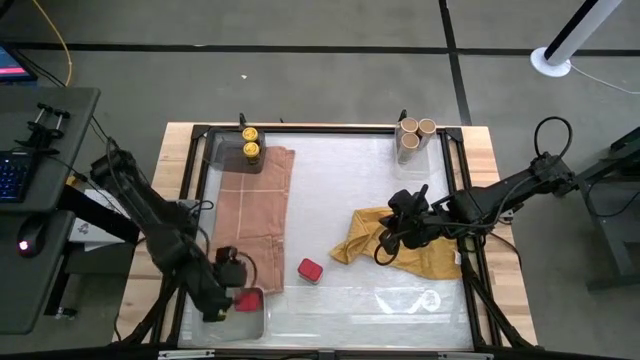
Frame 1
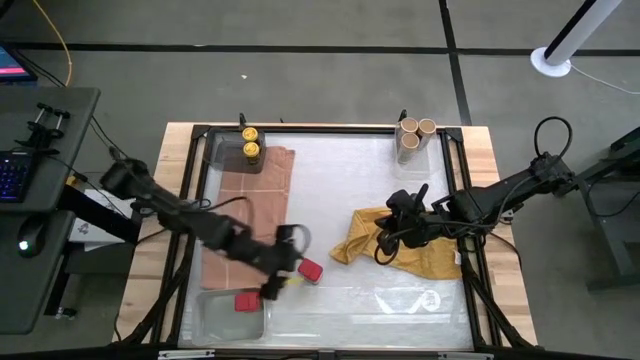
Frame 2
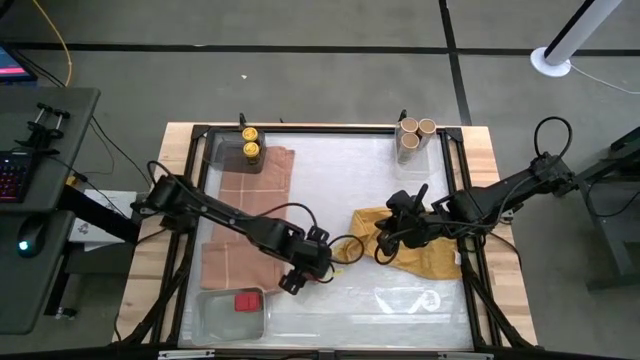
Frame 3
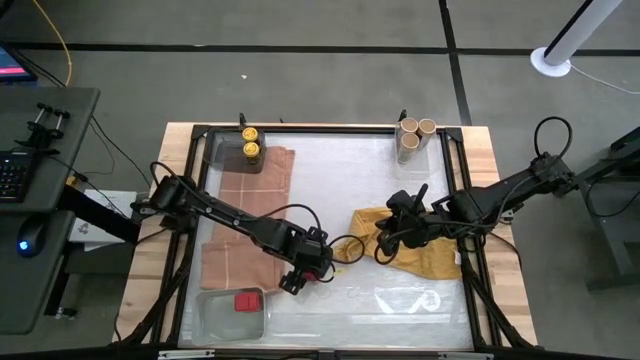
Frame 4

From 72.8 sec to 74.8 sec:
Task: Sort spices by type
Put the red seasoning can into the gray bin

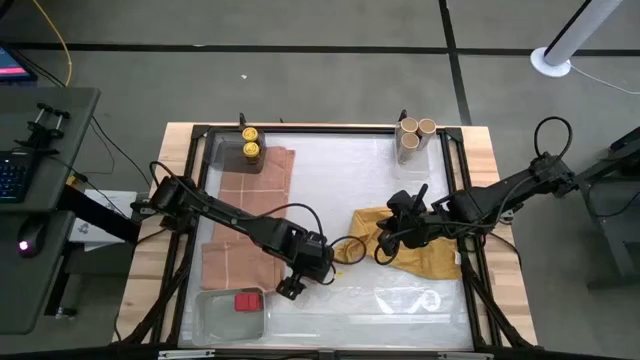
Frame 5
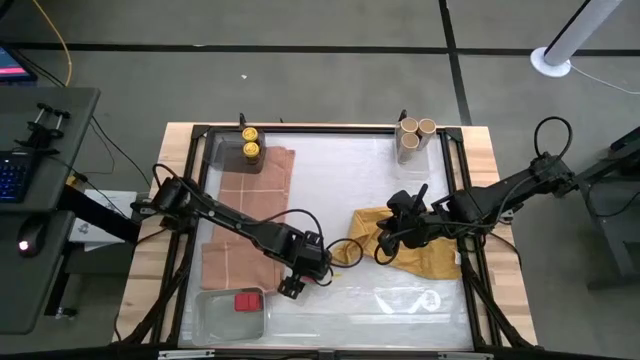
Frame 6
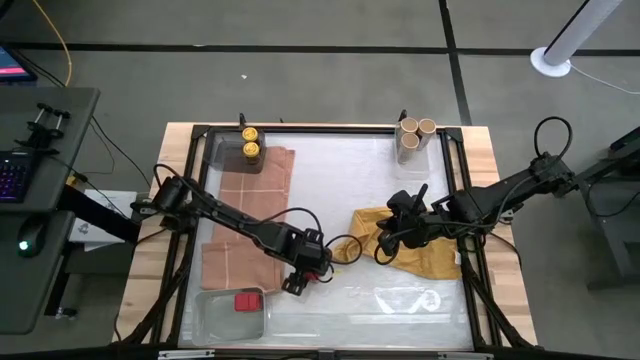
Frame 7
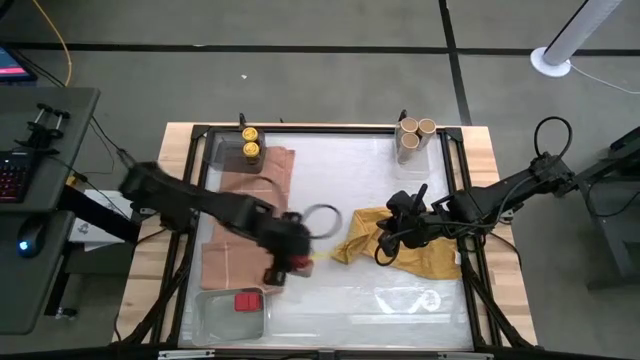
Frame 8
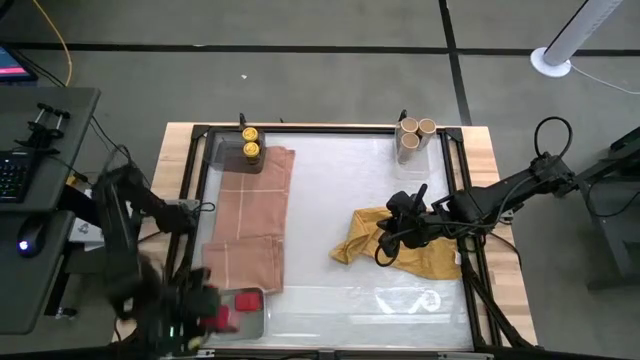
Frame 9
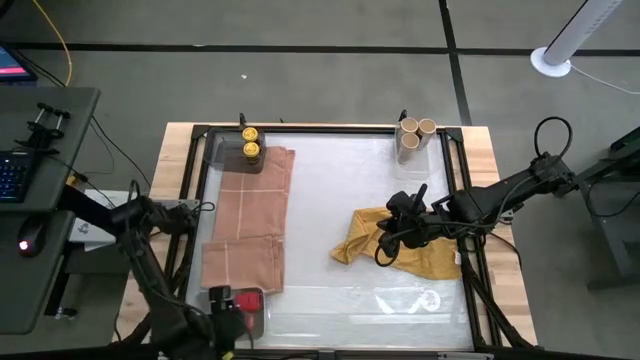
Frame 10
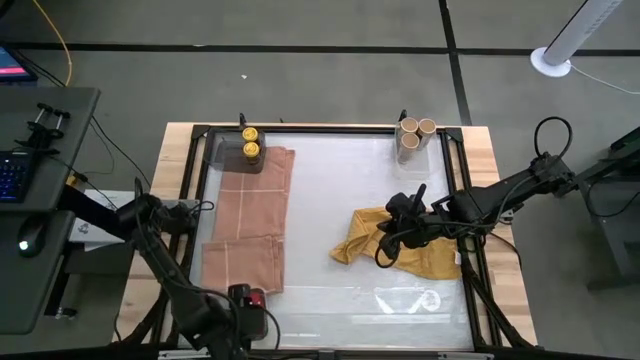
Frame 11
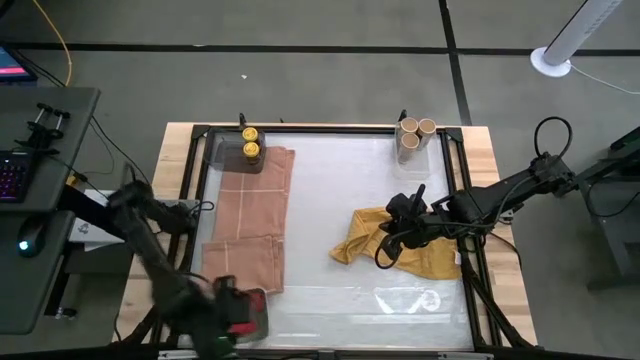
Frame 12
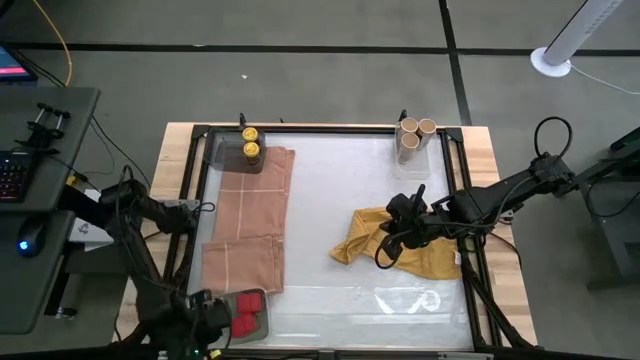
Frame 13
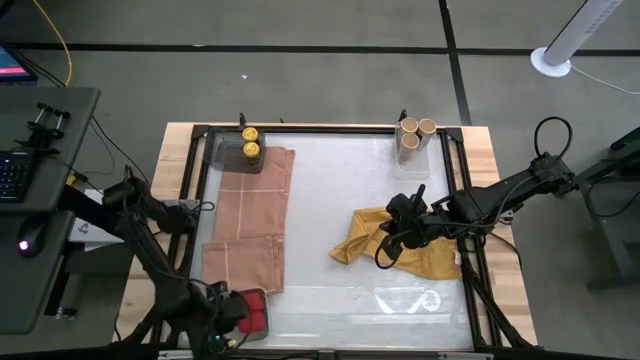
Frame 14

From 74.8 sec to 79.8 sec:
Put the red seasoning can into the gray bin

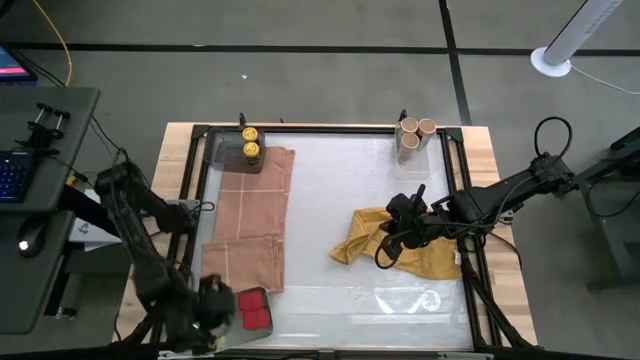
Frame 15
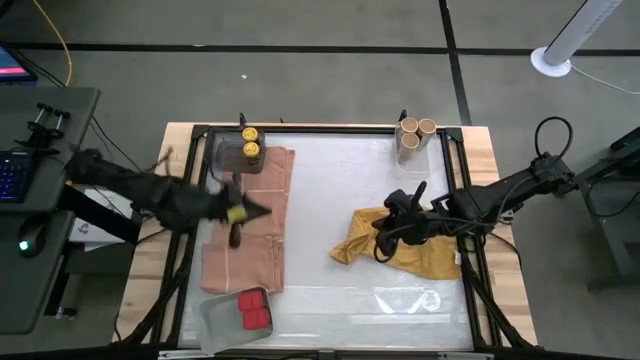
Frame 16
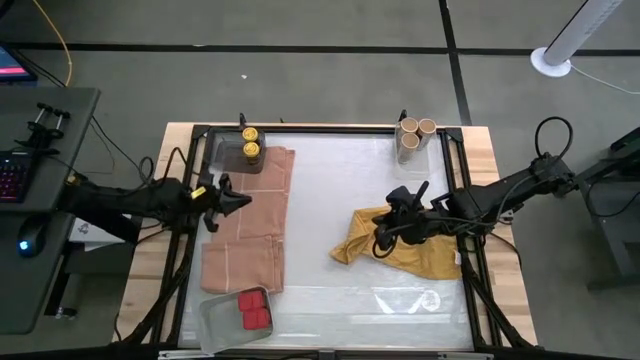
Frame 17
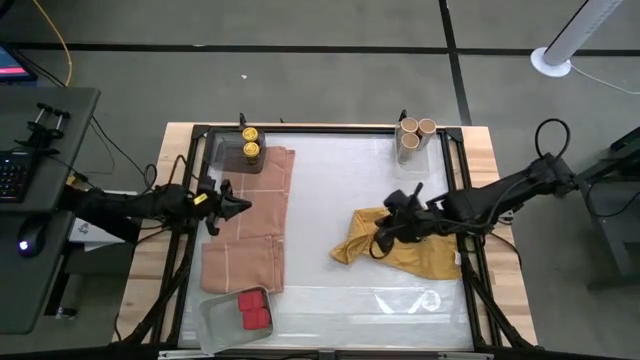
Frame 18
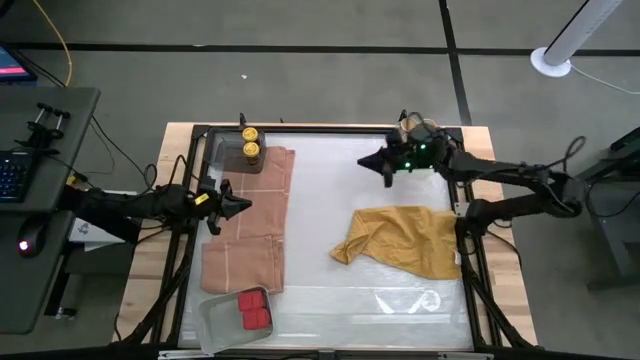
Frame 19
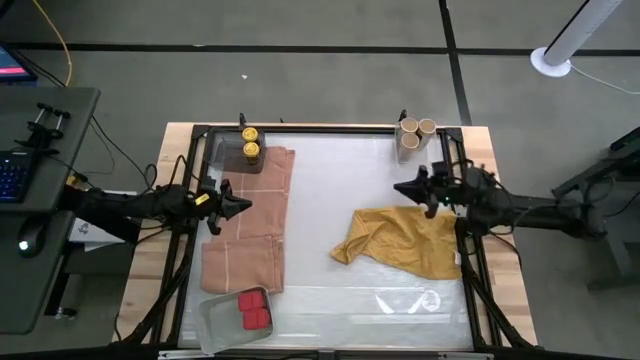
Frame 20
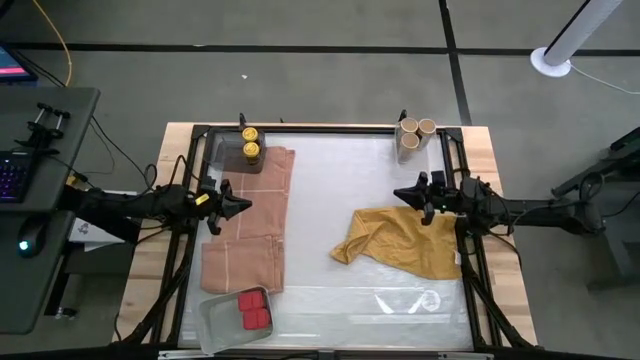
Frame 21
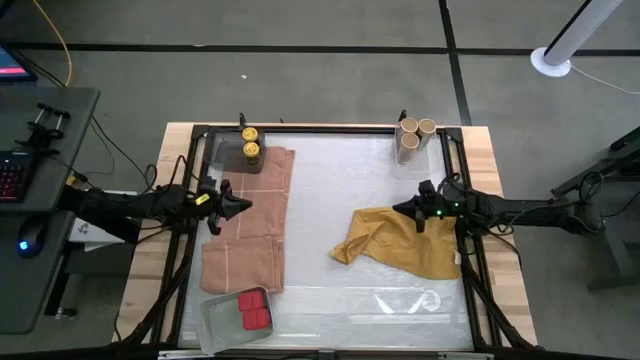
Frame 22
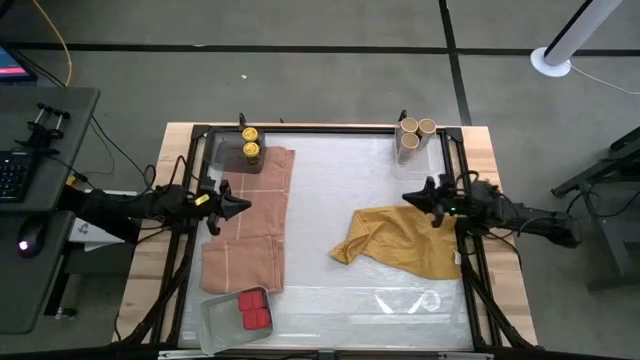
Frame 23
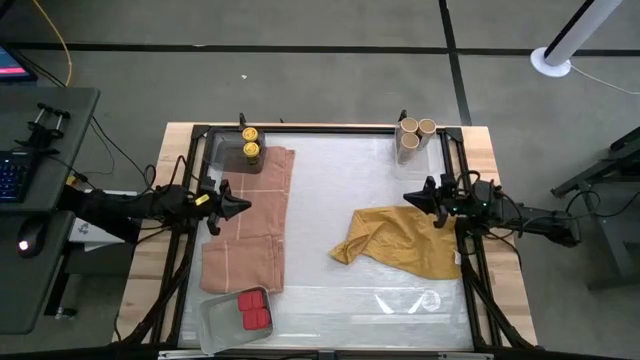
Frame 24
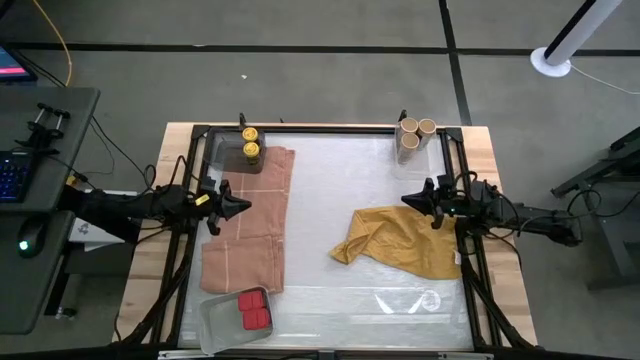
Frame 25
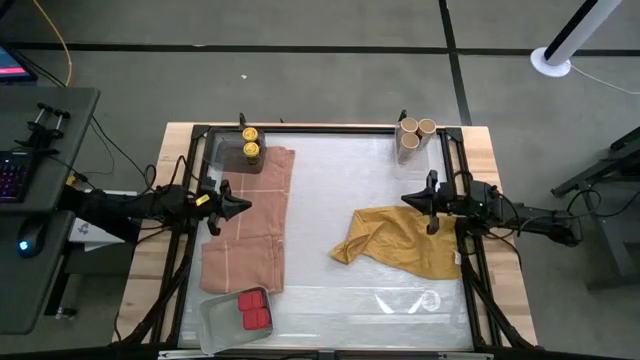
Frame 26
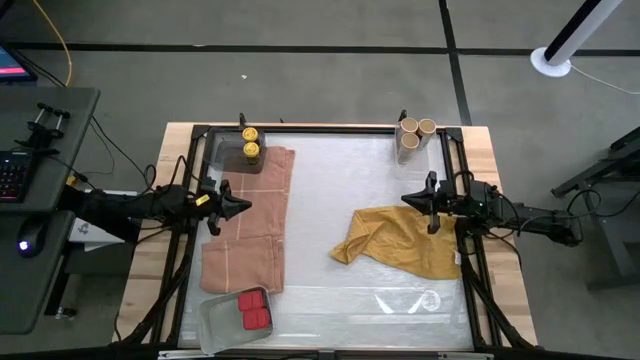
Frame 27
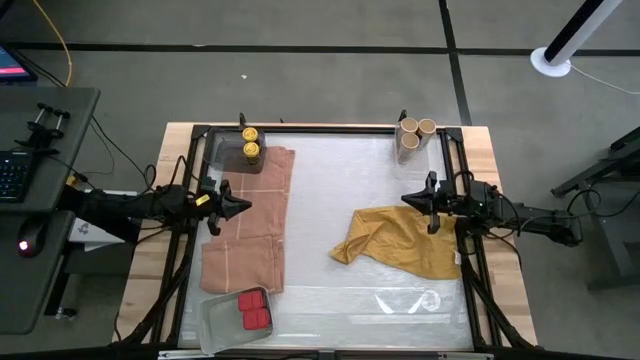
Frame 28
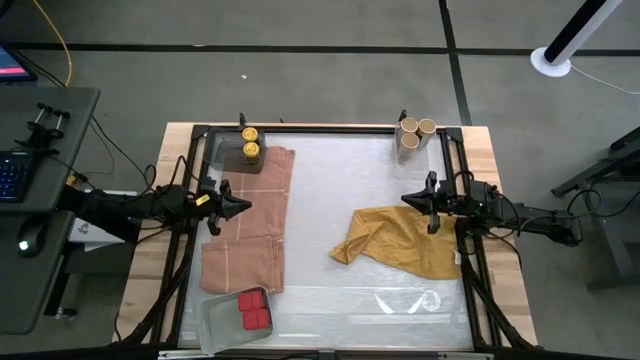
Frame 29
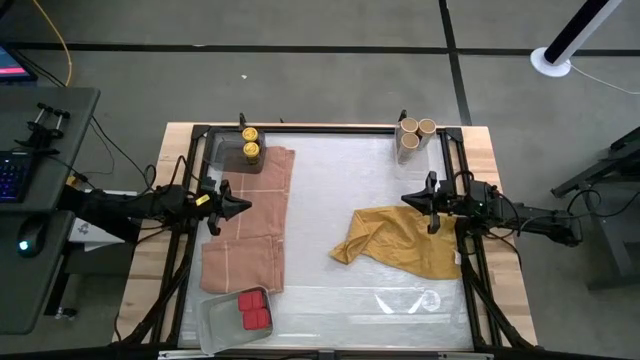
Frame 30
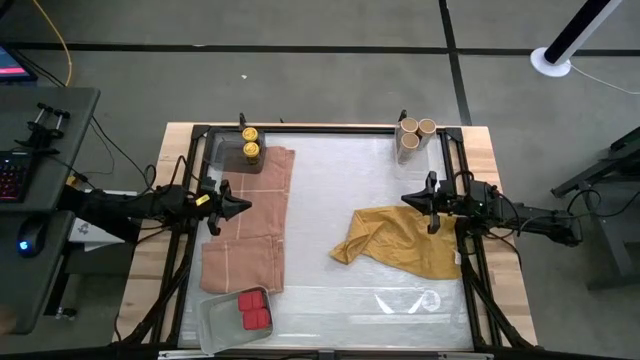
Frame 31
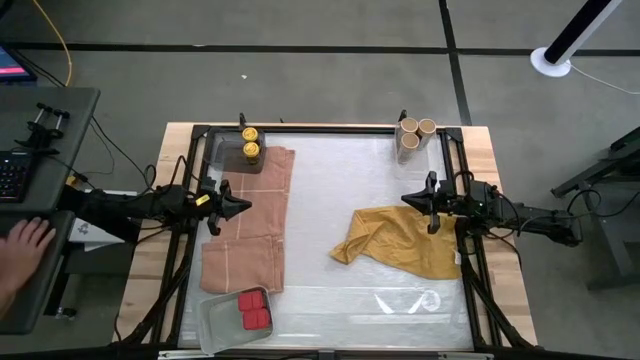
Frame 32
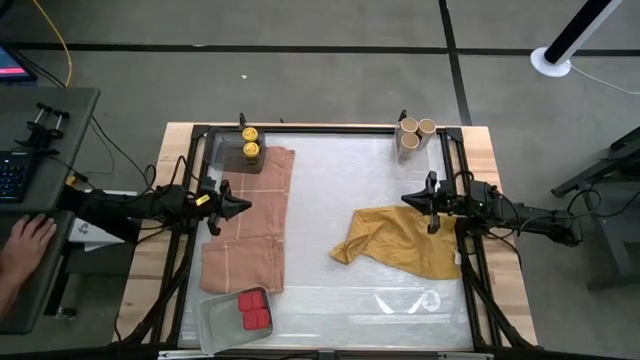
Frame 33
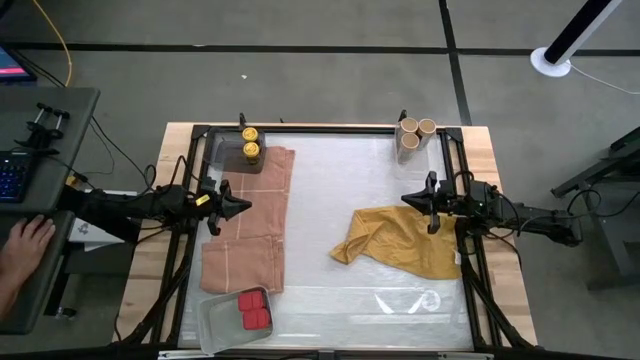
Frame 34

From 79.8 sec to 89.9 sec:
Return to Home Position

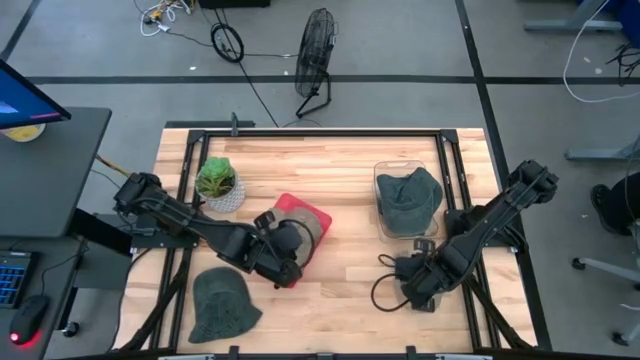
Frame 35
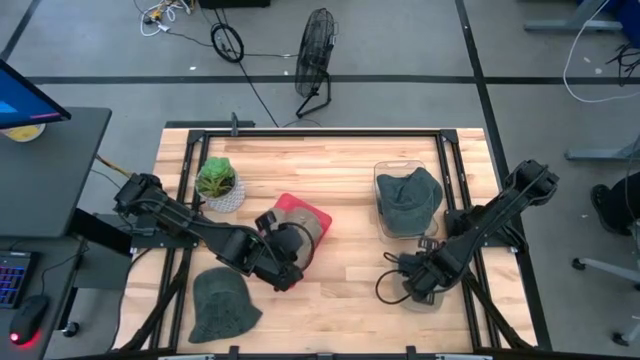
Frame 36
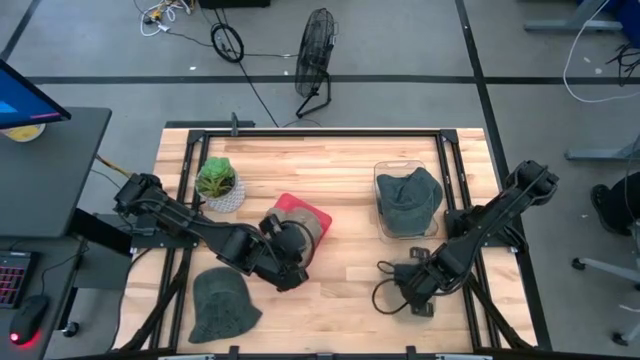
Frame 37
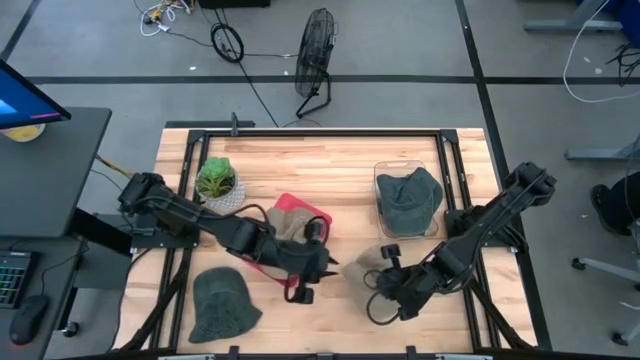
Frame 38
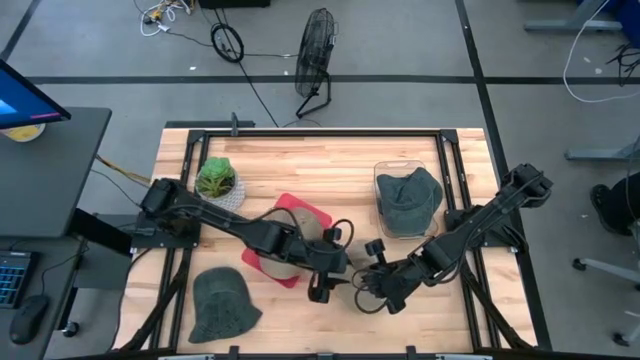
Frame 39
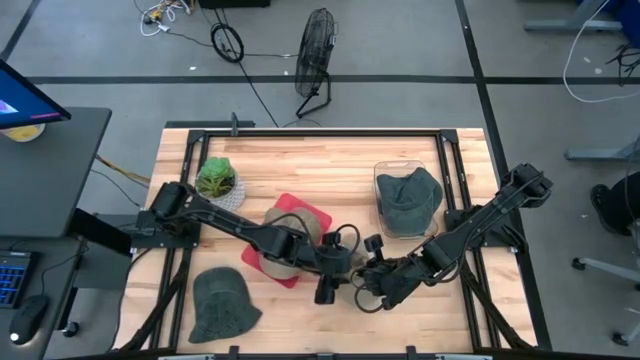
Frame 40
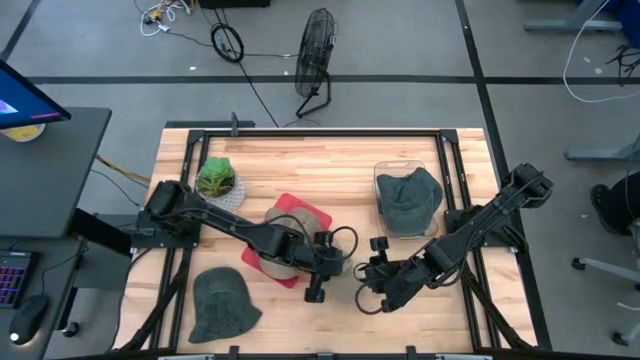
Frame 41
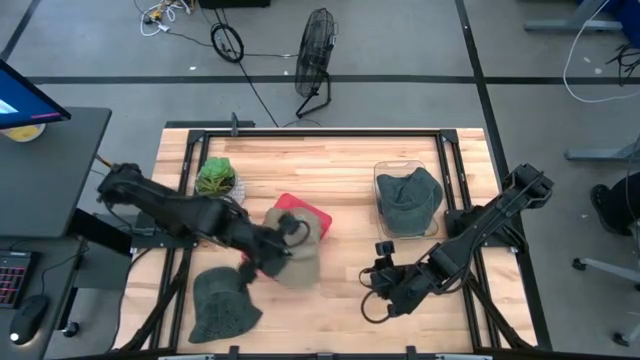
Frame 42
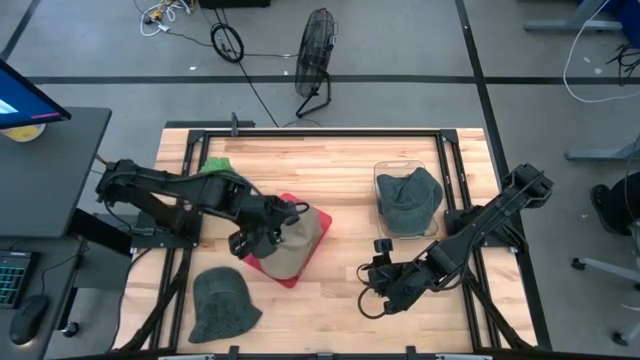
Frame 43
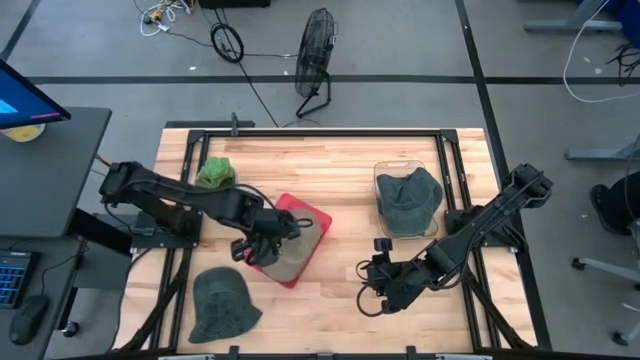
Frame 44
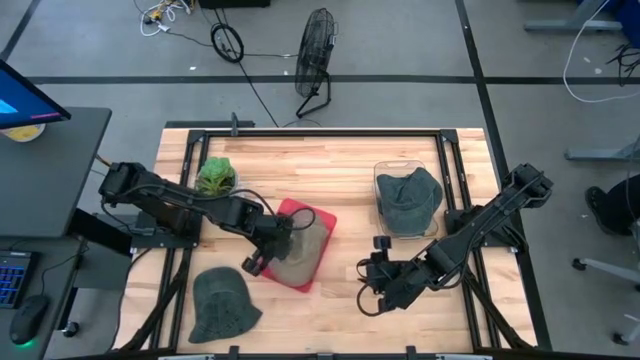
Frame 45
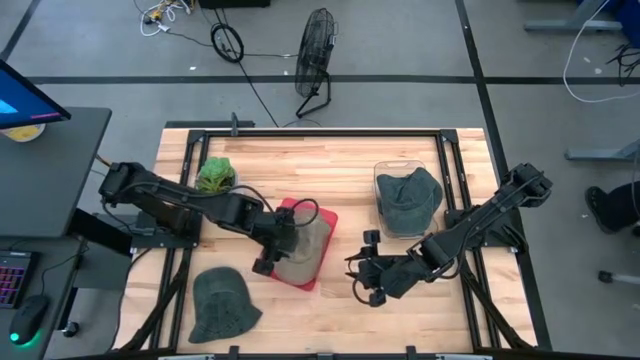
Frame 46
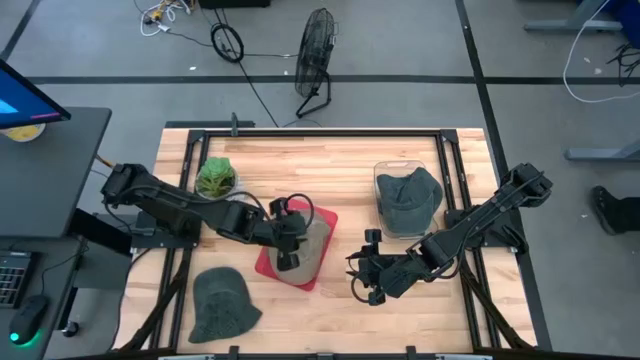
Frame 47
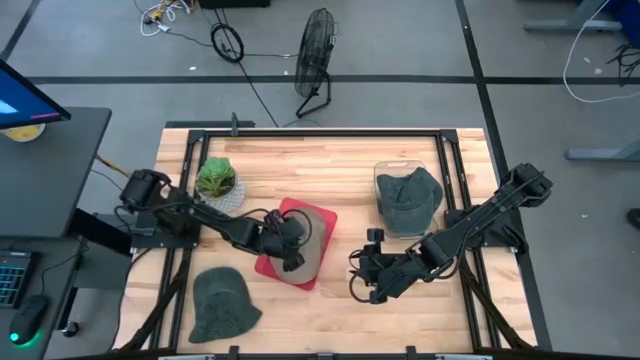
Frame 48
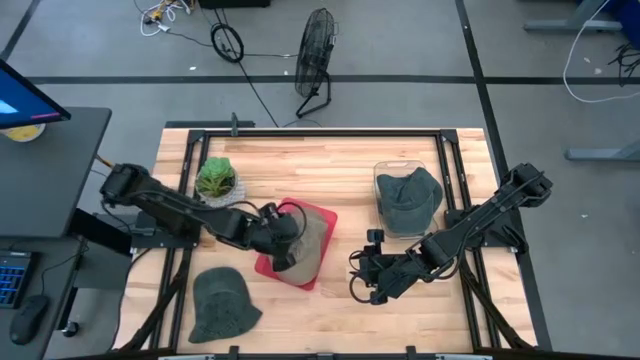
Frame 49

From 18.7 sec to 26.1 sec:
Task: Pick & Place hat
Put the brown cap into the red bin
